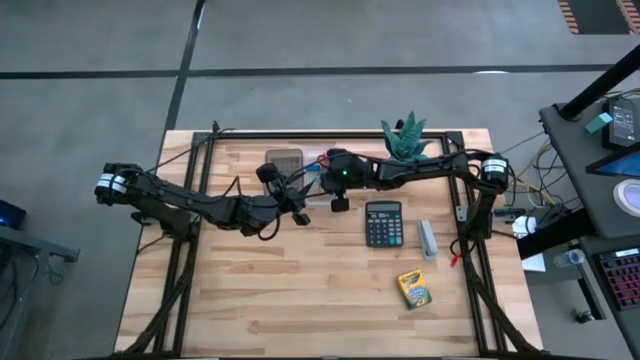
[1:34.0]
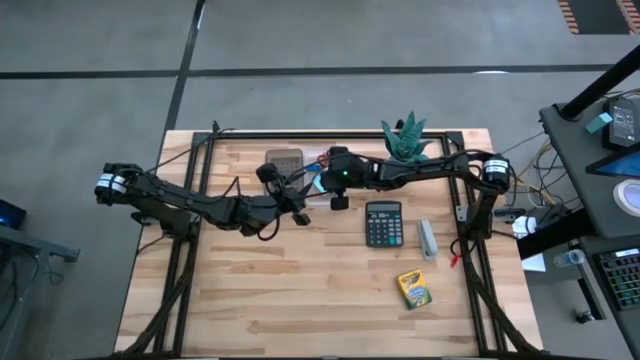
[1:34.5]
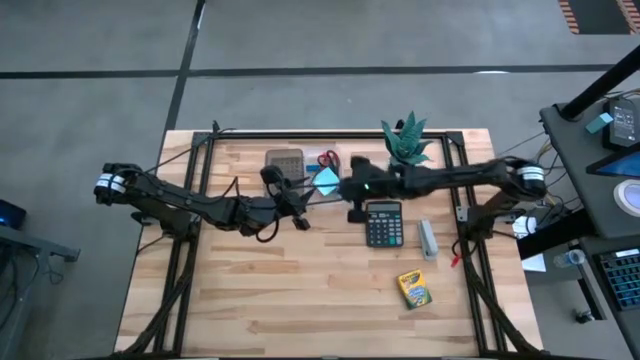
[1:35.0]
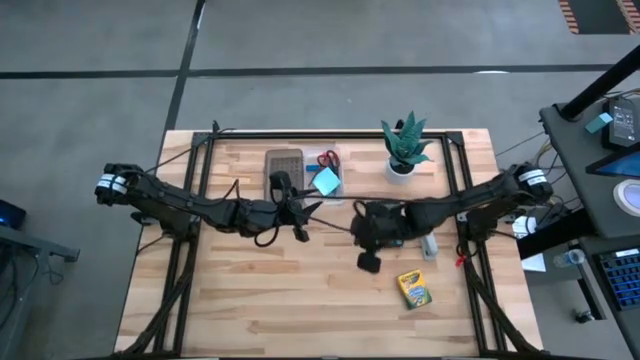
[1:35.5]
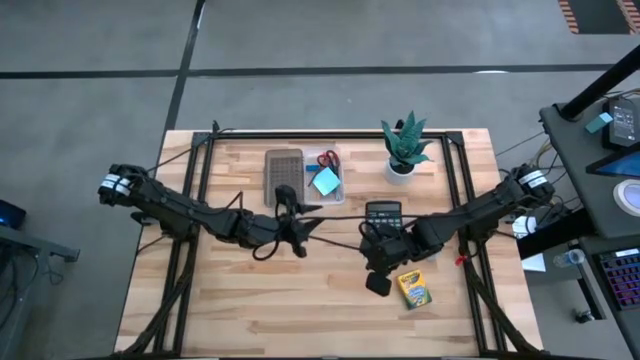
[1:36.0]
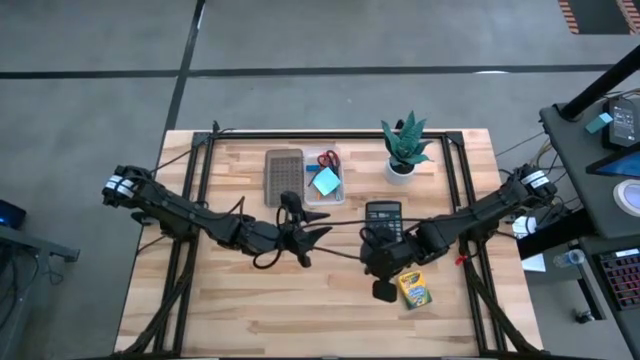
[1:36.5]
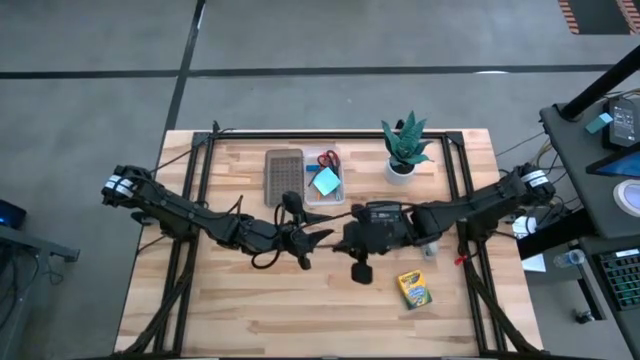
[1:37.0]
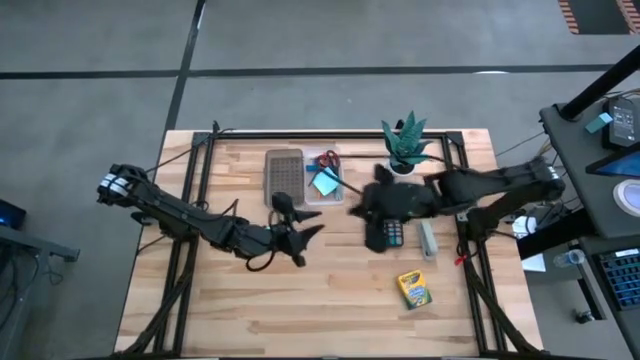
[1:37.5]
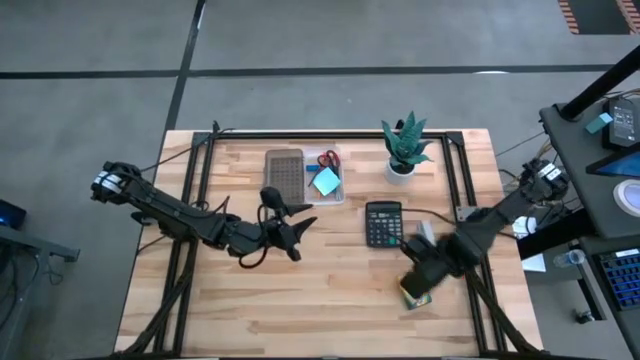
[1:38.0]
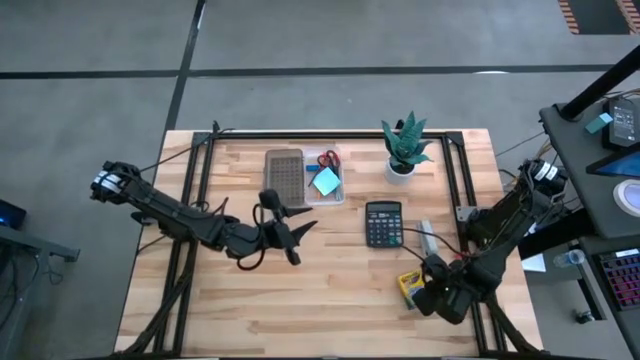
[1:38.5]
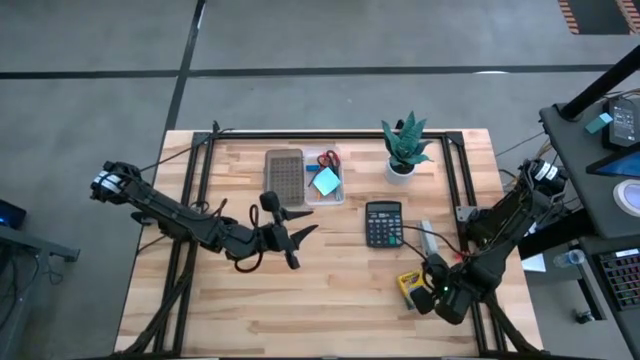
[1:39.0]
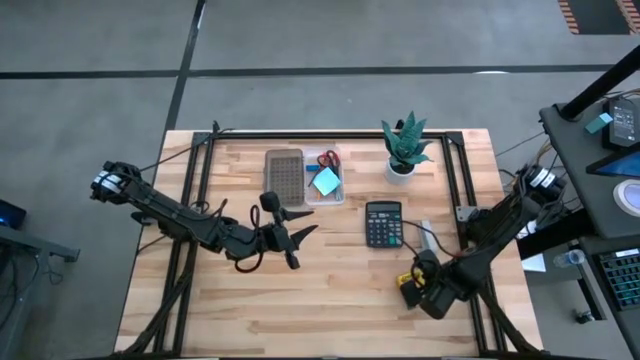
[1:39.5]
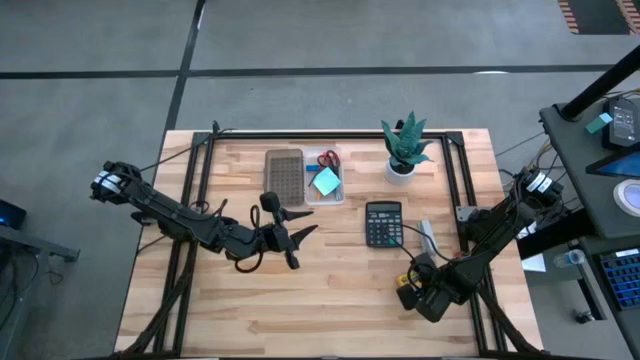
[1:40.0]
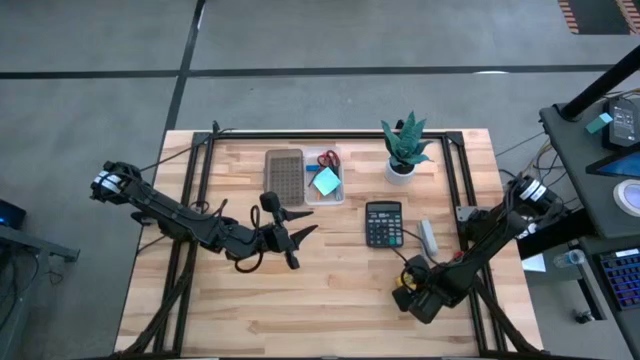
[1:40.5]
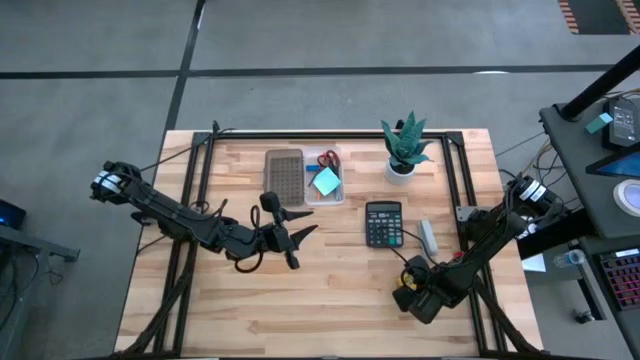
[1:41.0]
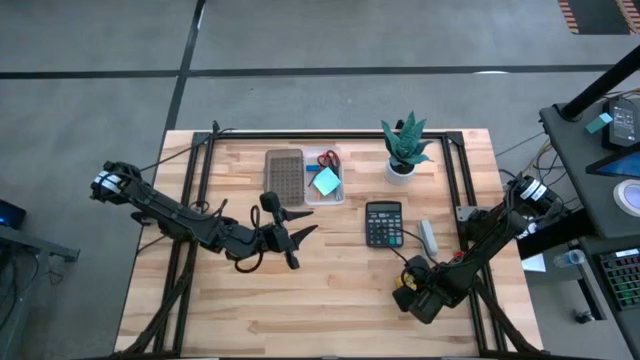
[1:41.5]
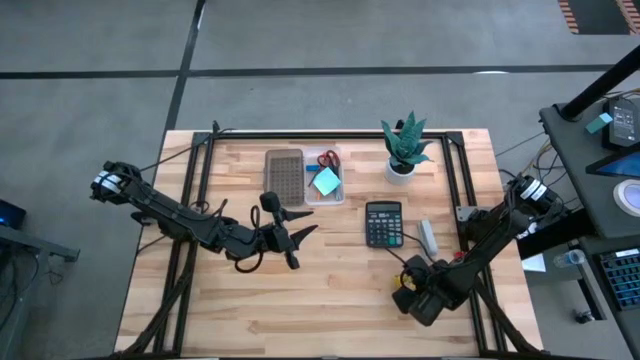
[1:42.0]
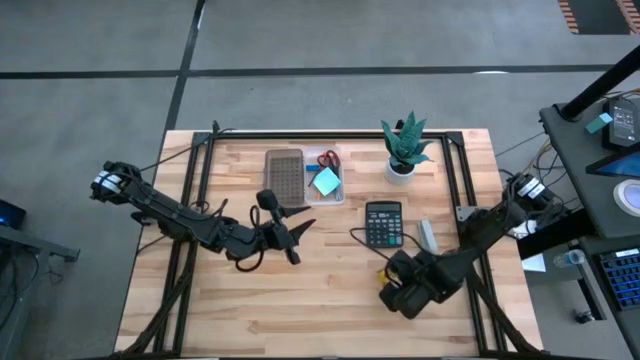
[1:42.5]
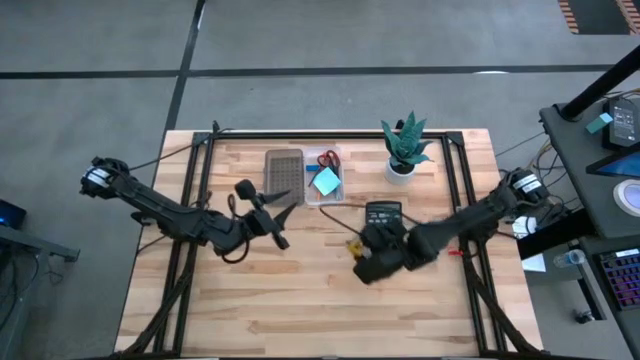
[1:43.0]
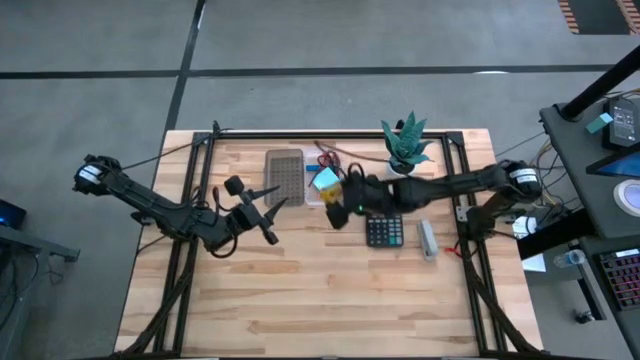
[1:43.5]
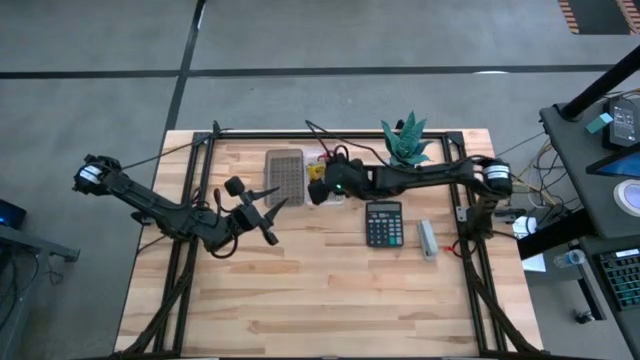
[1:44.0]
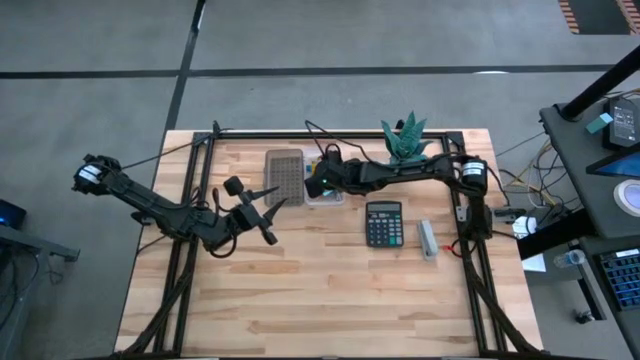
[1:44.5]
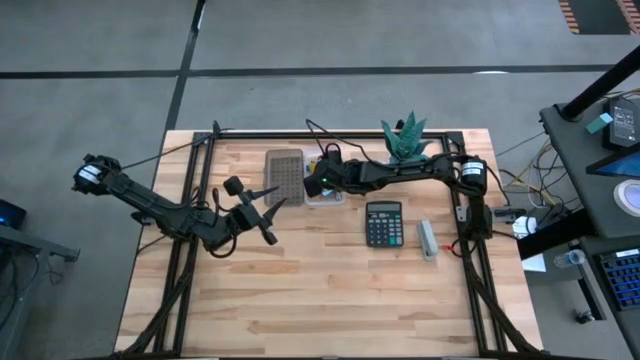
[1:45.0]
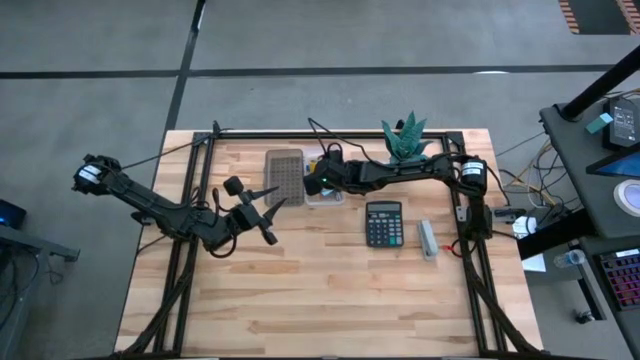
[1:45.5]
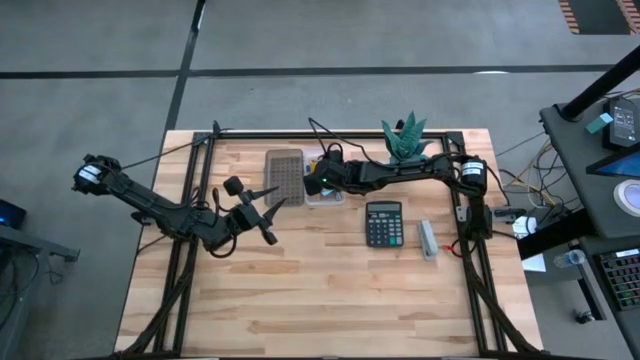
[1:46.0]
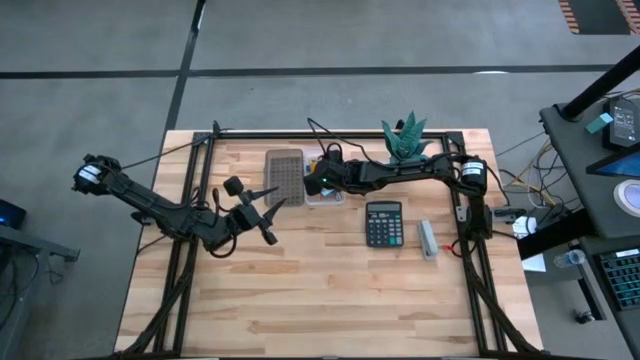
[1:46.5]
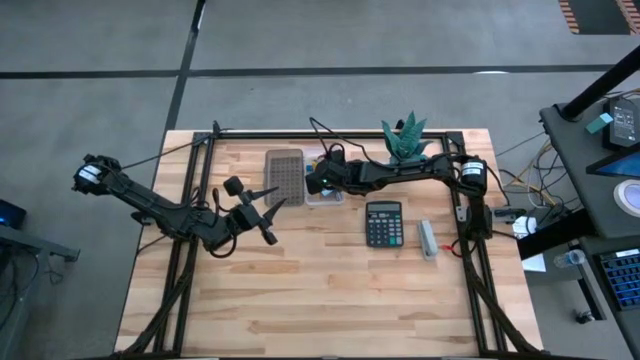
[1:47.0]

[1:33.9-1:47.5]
Task: Pack school essentials
Put the yellow crayon box into the transparent supply box

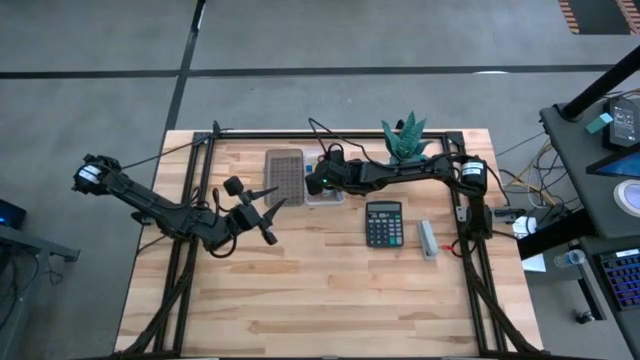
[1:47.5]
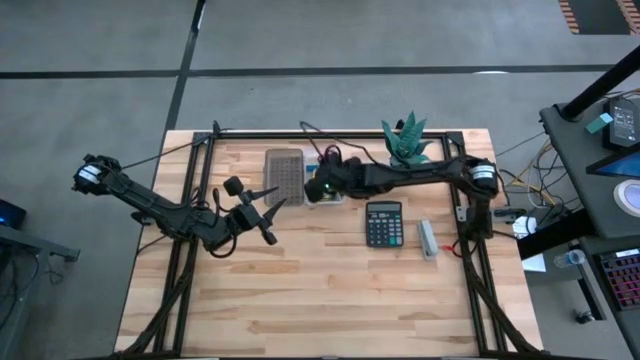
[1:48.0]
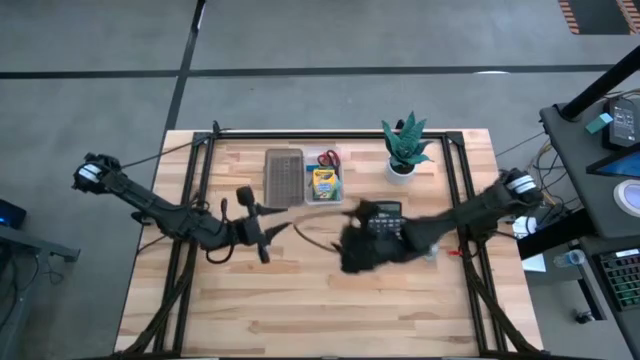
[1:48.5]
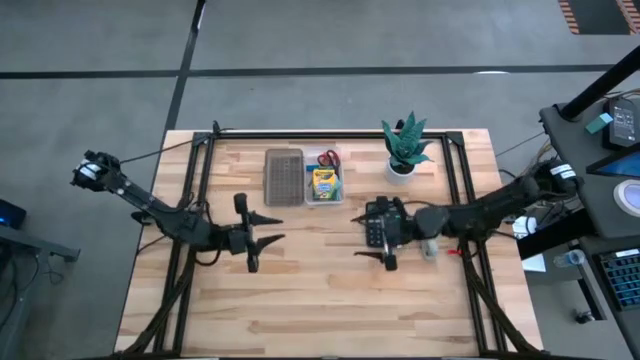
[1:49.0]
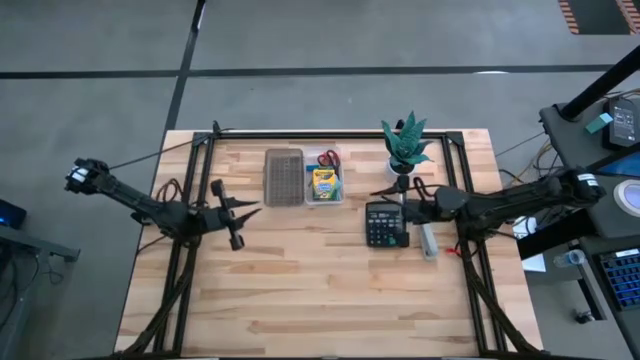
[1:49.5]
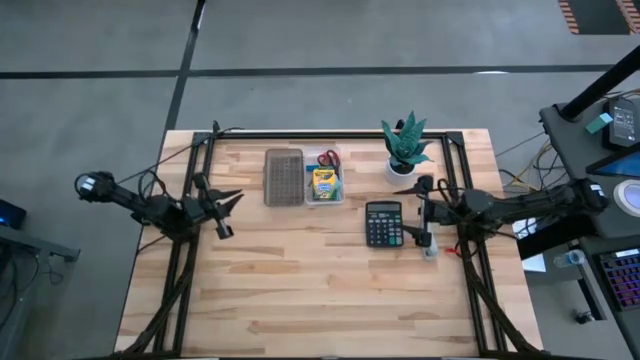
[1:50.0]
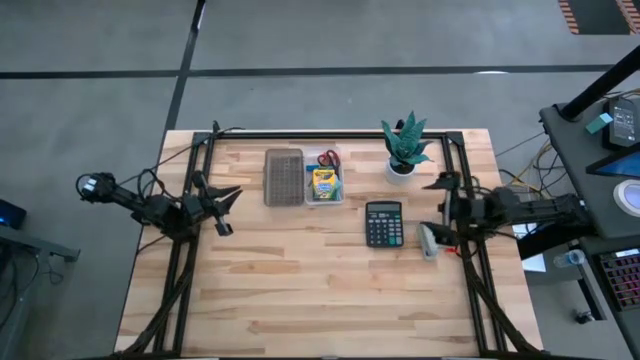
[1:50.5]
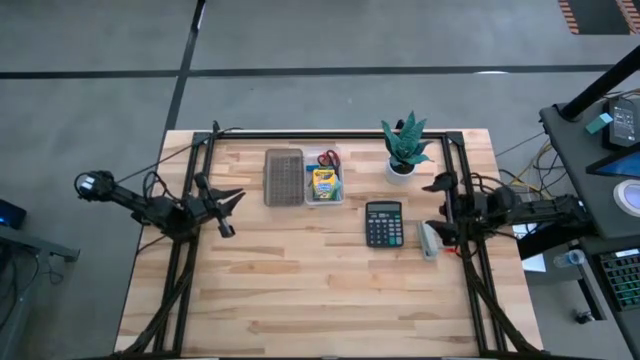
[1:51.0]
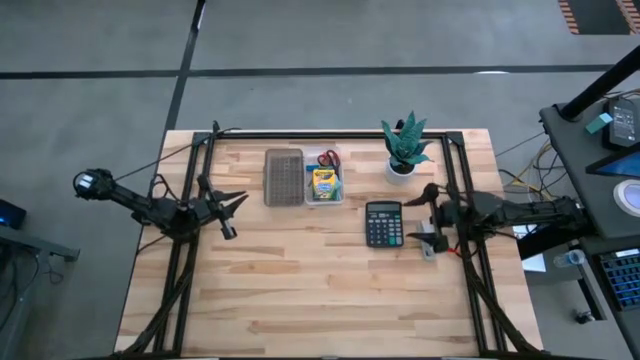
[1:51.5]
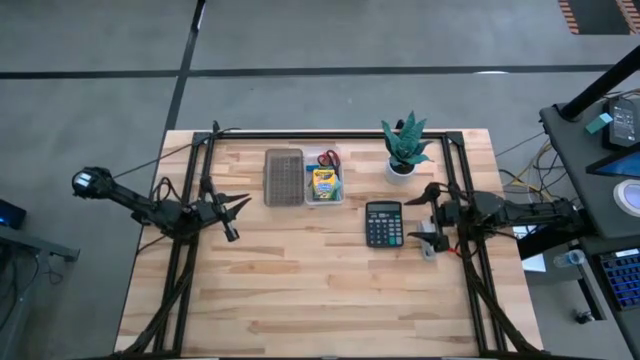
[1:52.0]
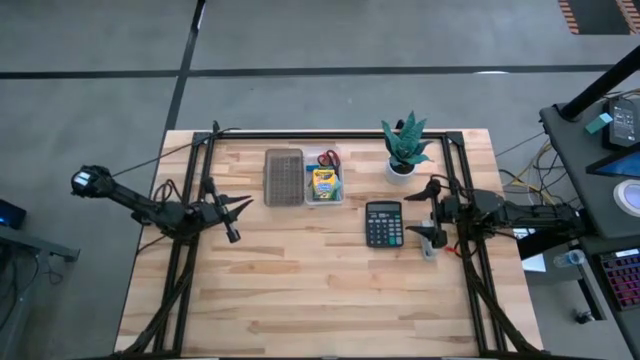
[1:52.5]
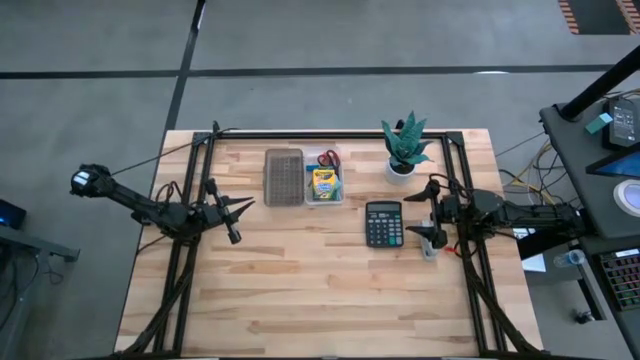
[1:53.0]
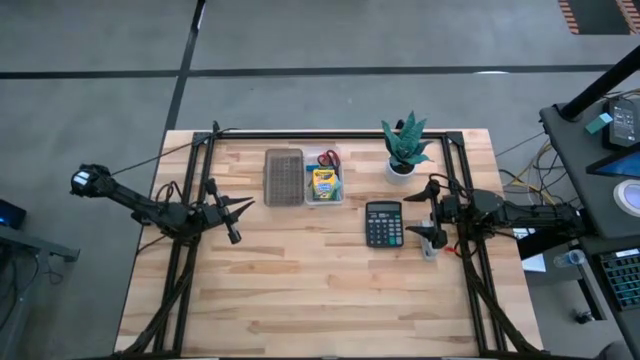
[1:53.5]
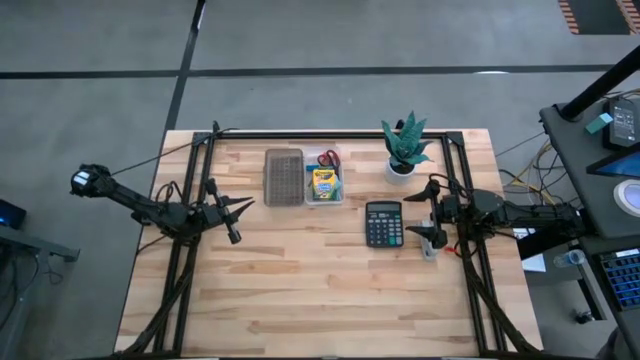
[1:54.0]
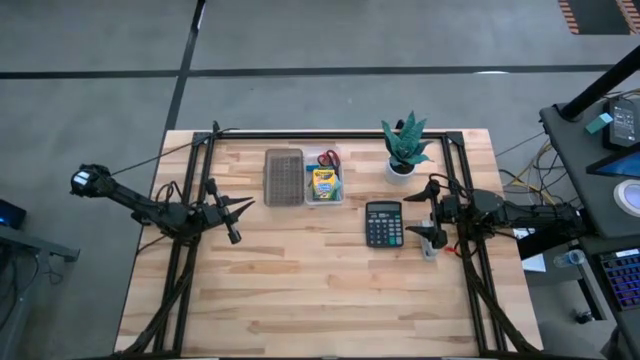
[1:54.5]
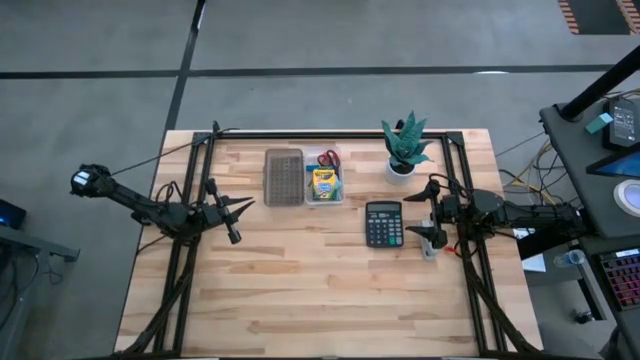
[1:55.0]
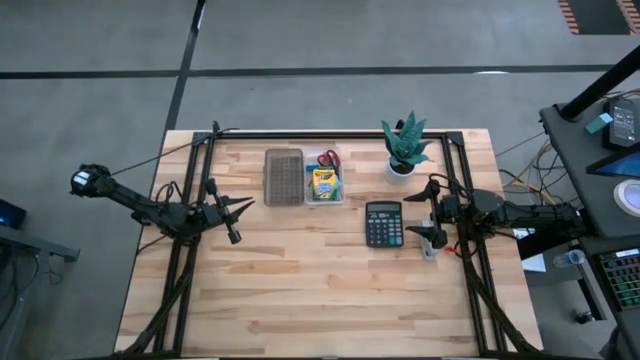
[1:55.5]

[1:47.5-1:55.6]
Return to Home Position

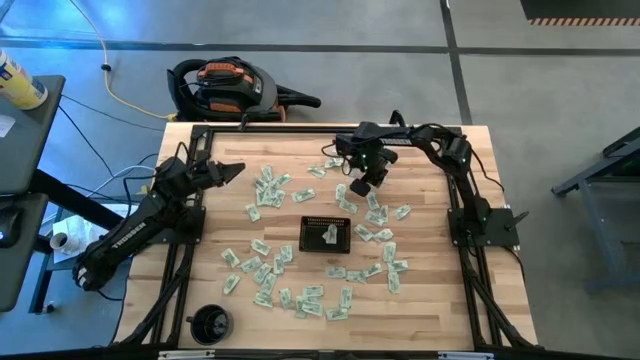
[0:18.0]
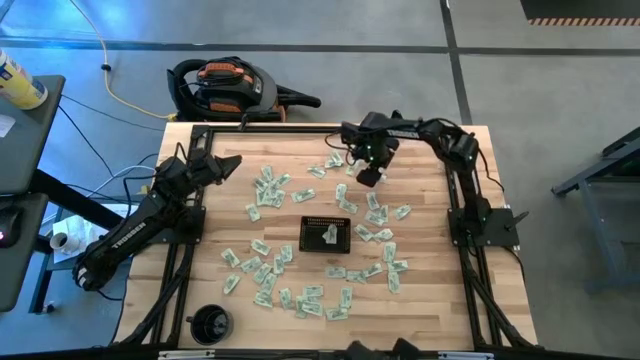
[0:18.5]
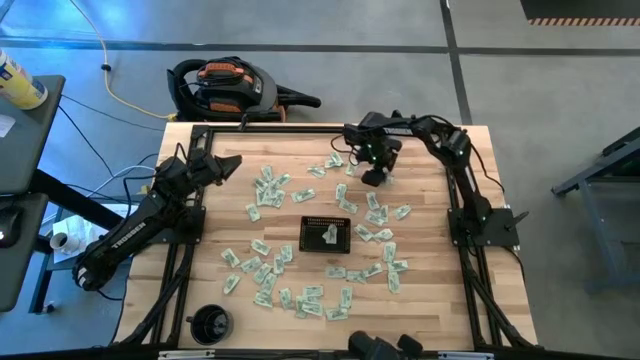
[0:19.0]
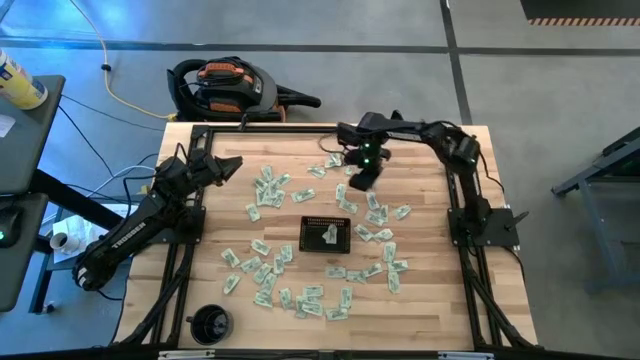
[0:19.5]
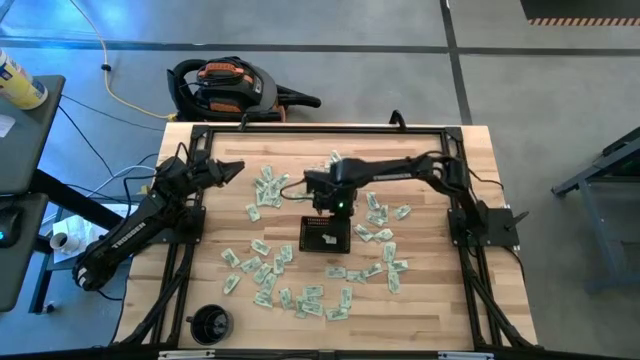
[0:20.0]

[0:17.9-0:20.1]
Task: Pick and place Stevia / Truvia into bins
Put the green stevia packet into the black basket
